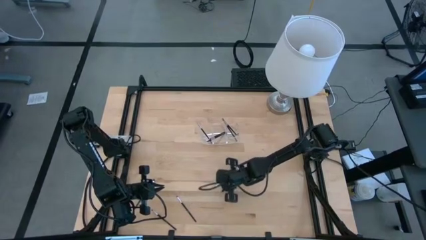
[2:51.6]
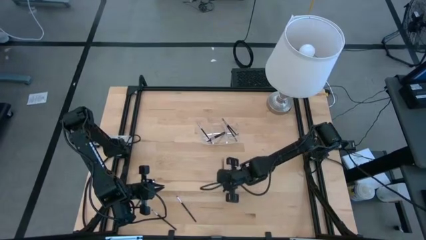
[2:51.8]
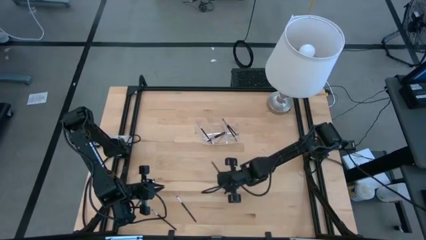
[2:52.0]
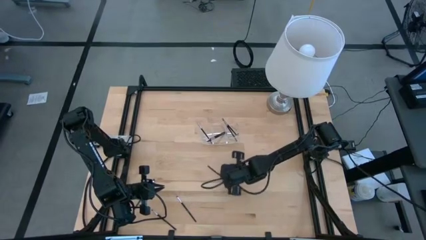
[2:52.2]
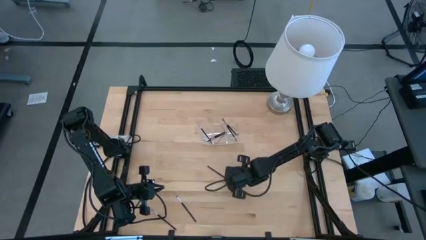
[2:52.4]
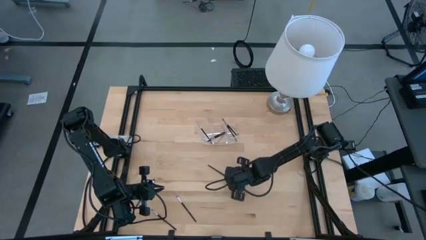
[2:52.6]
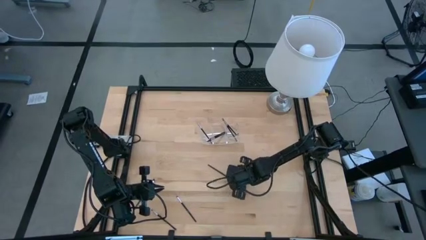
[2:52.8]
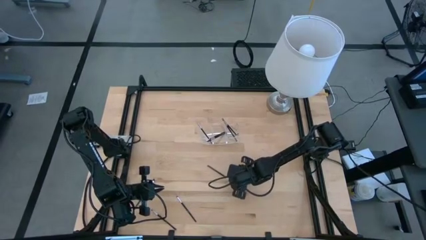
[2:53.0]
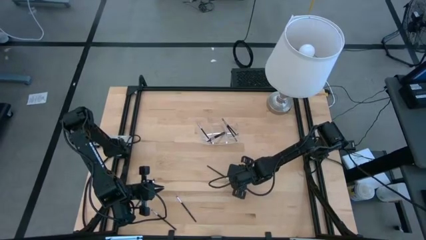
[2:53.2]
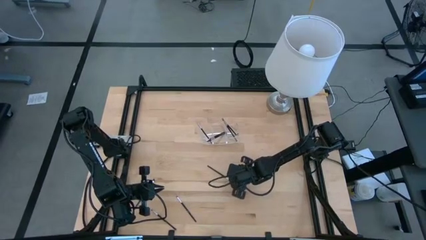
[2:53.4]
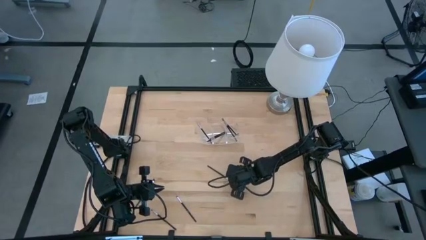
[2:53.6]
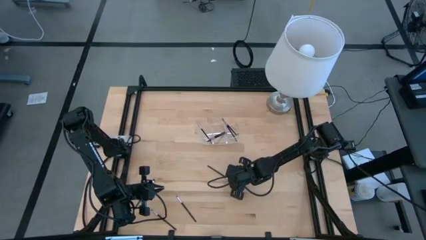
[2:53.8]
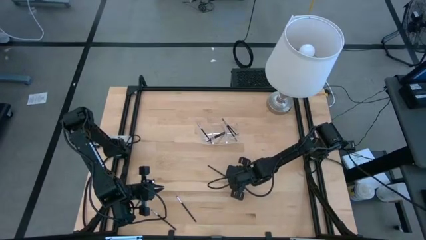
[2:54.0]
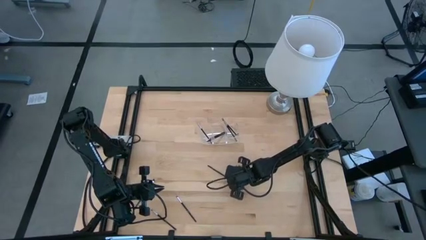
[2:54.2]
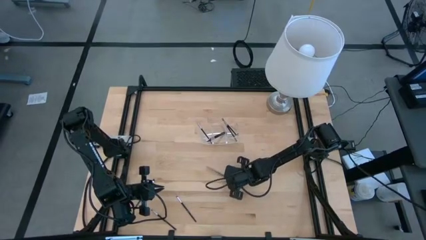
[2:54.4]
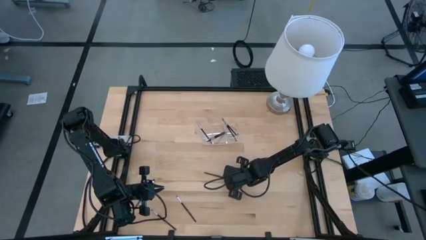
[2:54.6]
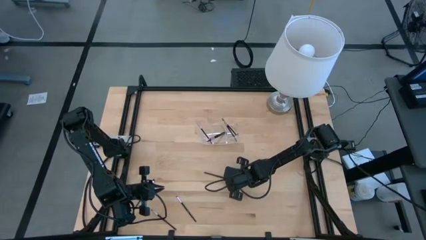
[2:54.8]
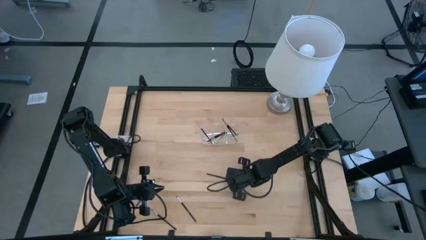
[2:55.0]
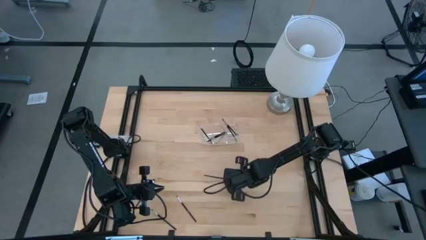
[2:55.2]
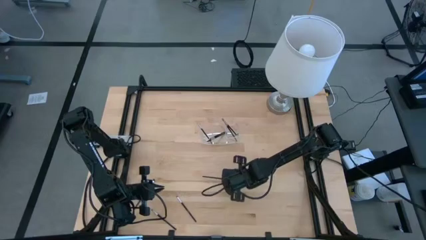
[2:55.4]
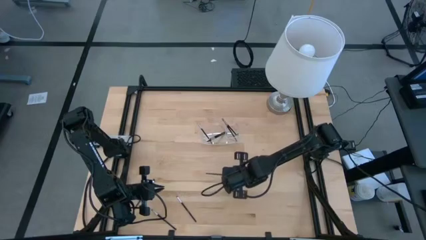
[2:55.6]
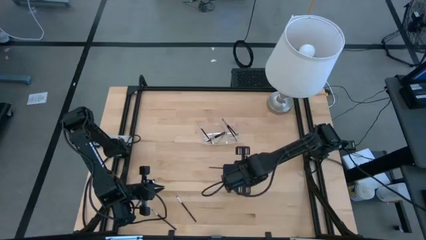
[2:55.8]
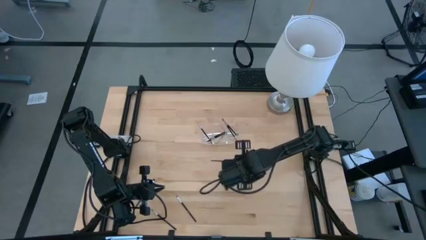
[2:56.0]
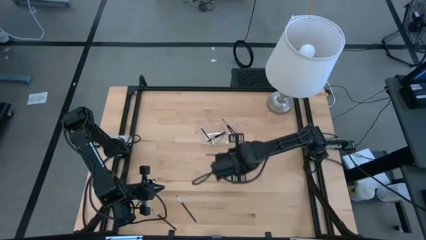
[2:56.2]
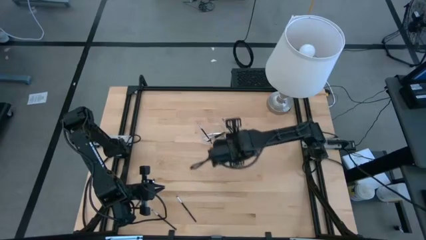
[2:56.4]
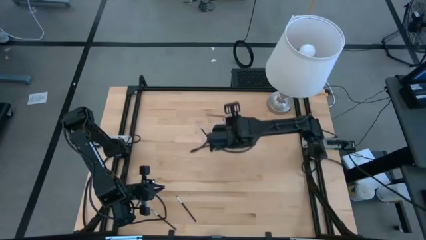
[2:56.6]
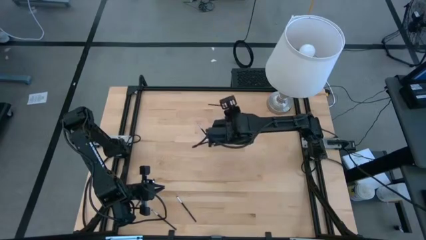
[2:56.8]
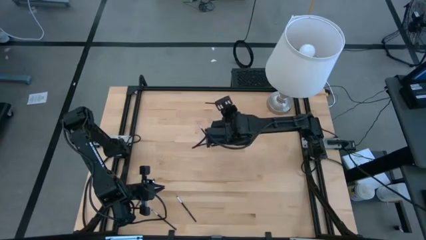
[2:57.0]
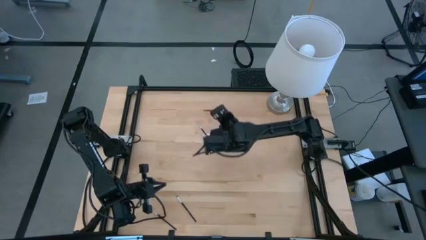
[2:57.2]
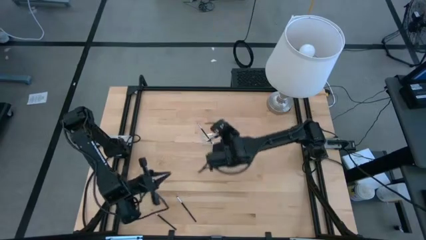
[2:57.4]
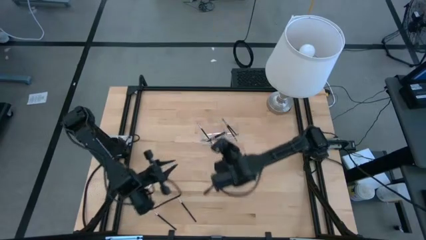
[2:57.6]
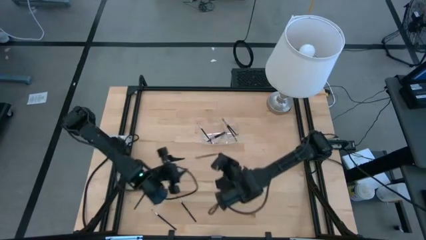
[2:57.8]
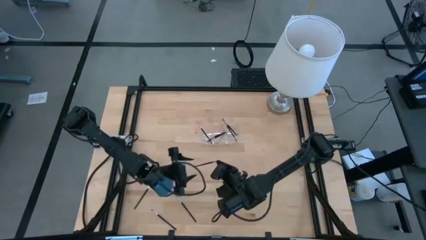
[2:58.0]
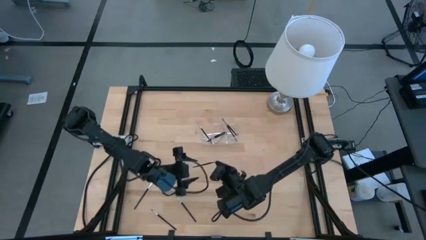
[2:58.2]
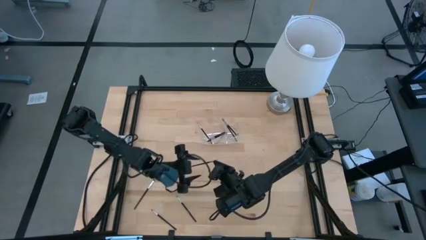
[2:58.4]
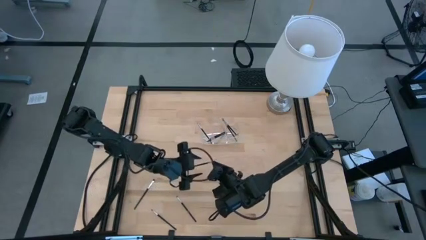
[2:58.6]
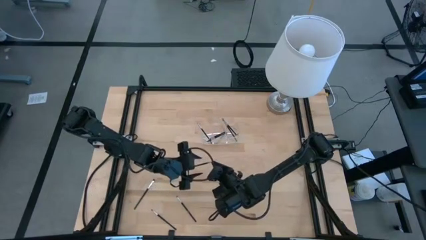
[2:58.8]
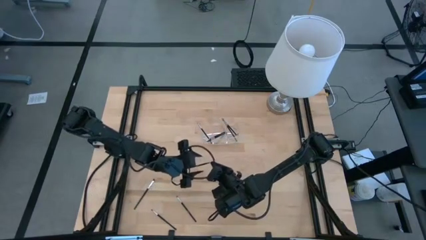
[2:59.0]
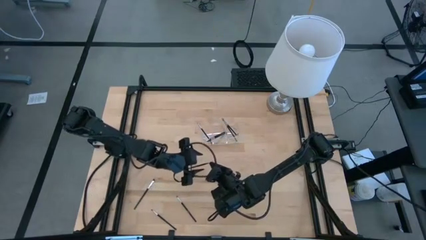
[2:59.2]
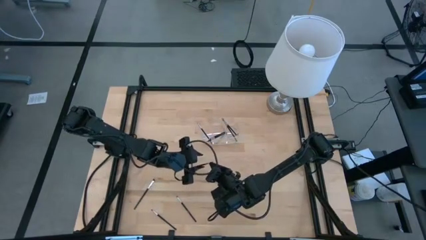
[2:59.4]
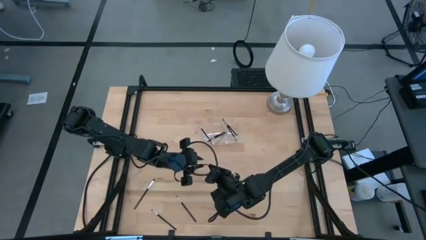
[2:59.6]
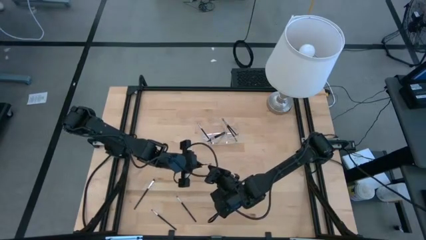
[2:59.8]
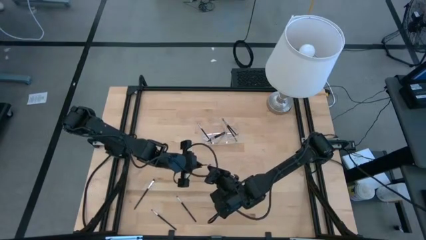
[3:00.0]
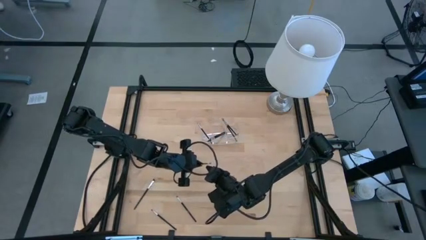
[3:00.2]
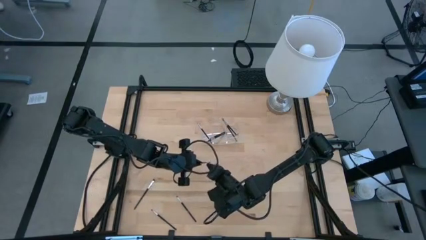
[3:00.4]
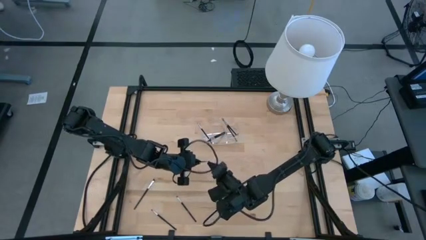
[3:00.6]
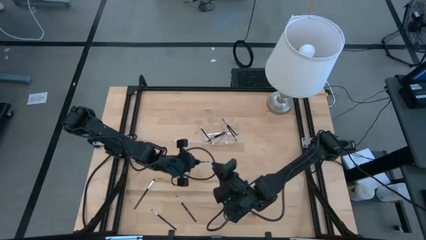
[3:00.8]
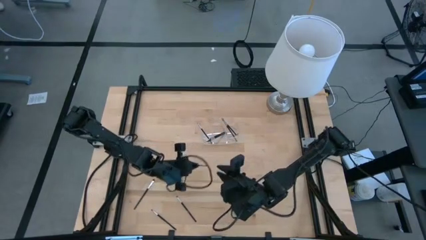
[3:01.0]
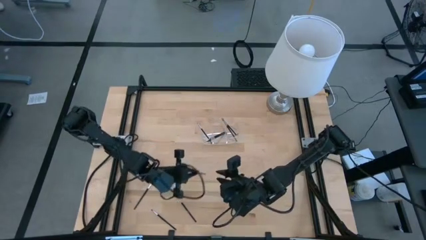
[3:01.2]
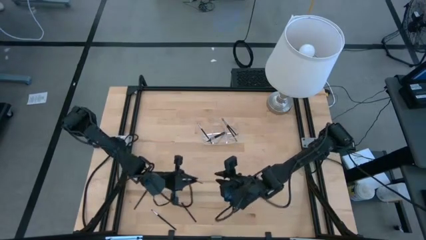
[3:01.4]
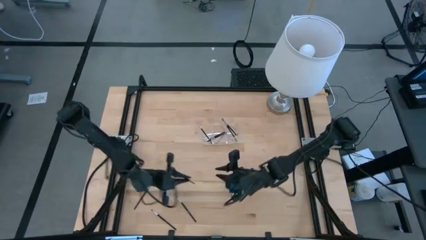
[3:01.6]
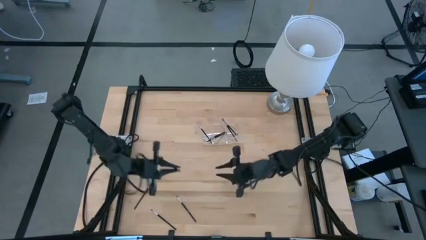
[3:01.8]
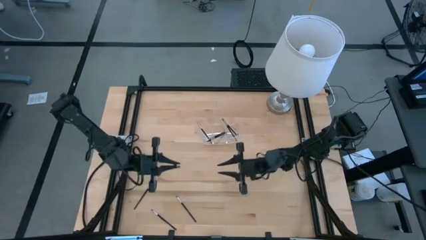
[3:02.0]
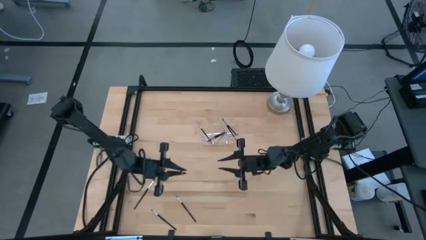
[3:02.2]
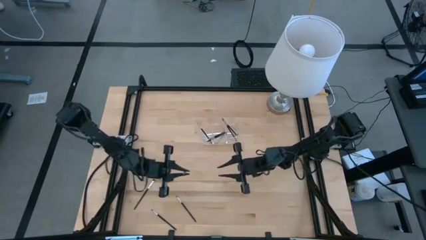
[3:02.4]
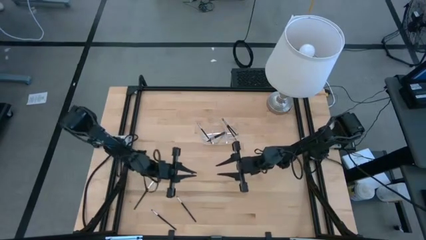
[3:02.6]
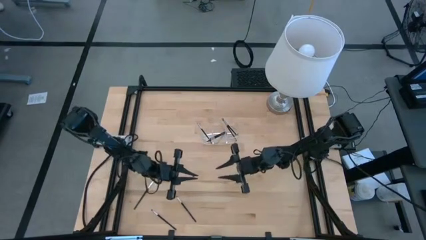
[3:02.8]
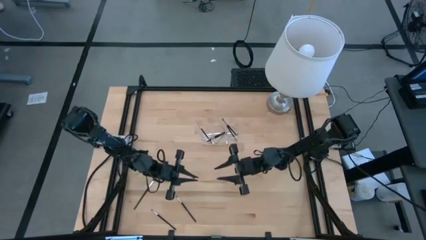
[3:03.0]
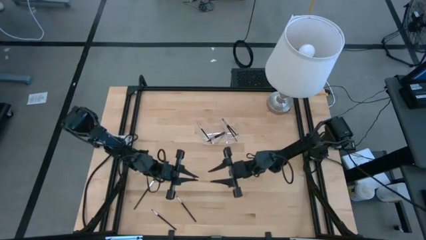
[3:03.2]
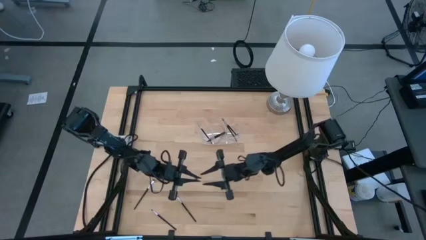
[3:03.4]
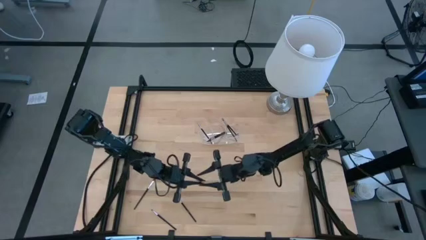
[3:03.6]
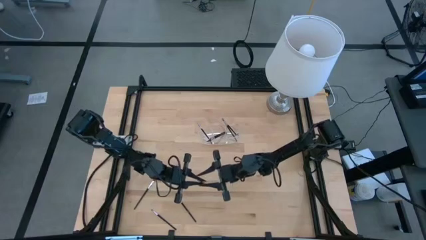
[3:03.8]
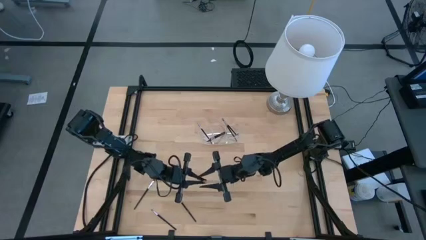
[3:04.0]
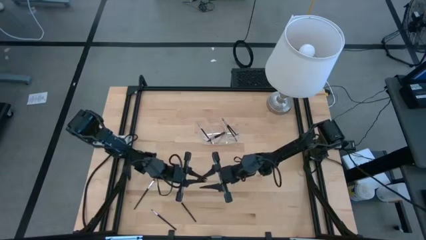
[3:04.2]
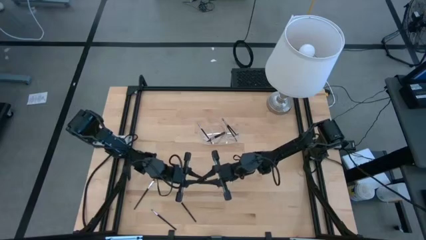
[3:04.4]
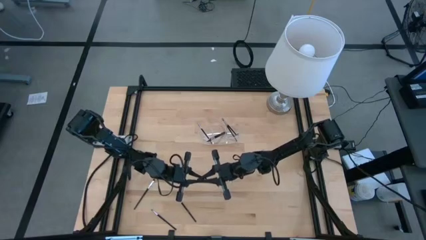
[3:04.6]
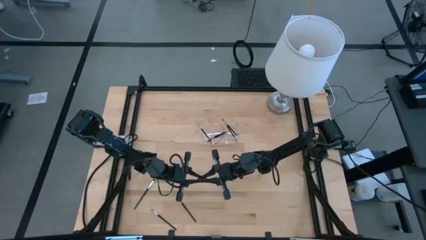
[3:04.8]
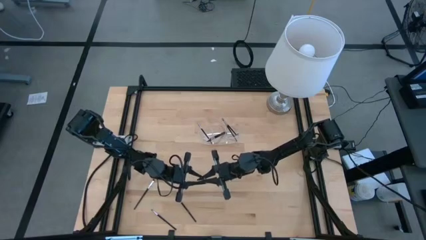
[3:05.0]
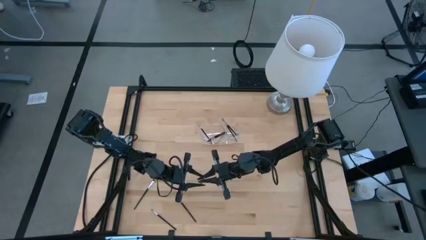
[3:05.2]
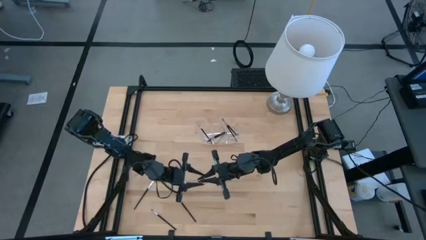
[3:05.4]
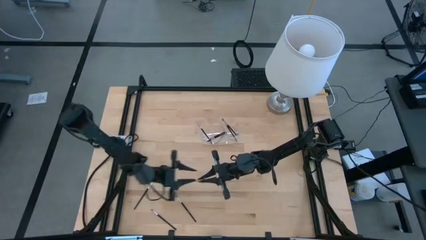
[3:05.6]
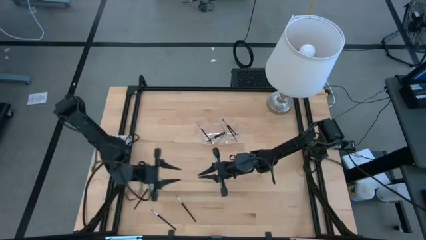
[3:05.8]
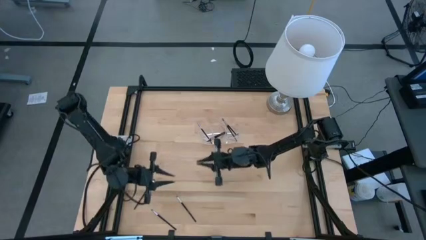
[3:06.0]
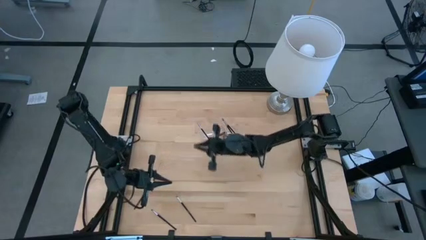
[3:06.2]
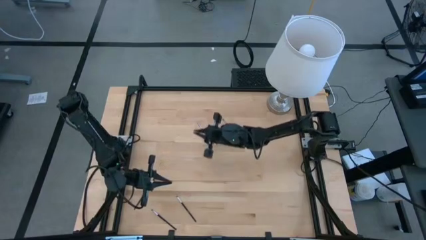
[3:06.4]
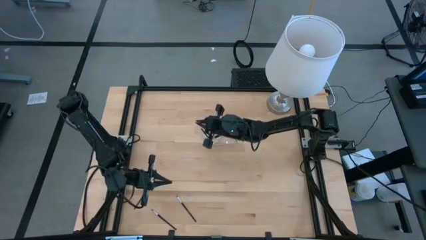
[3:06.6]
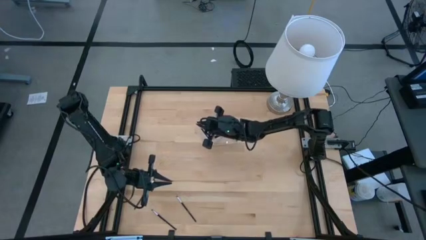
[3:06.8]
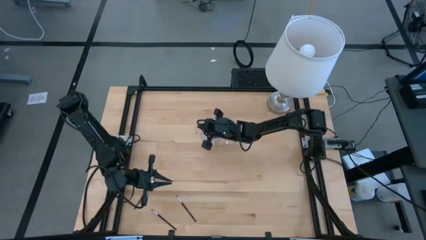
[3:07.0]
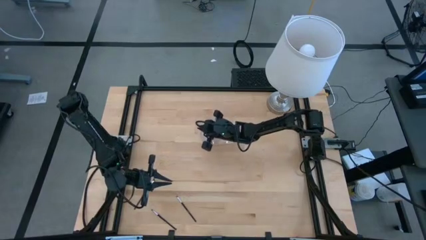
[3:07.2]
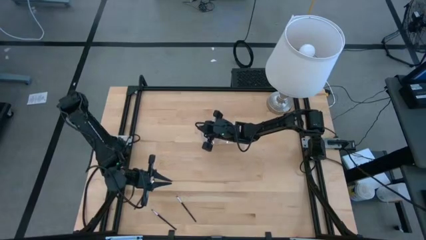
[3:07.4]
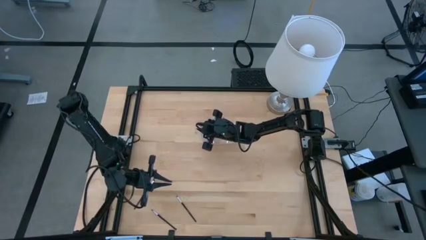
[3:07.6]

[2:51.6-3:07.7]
Task: Pick & Place Makeup Supplies
Put the makeup brush into the transparent organizer
